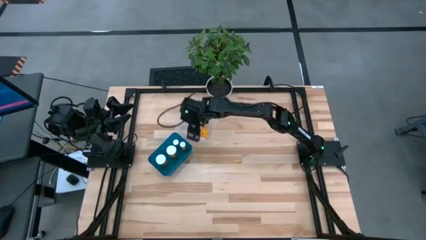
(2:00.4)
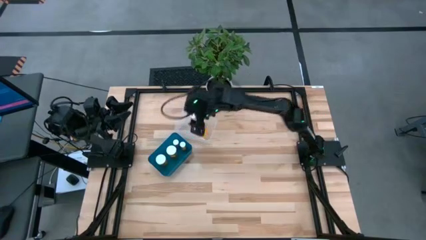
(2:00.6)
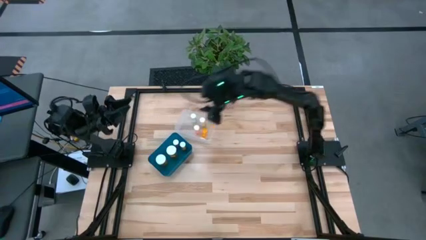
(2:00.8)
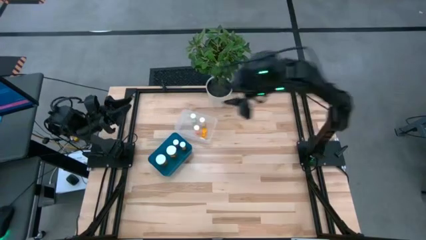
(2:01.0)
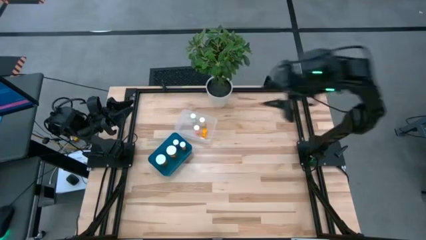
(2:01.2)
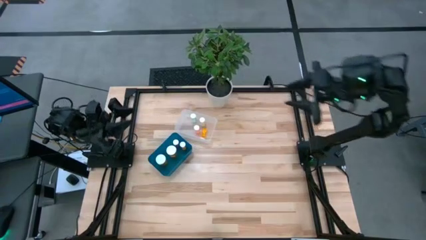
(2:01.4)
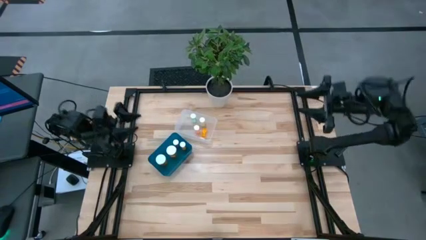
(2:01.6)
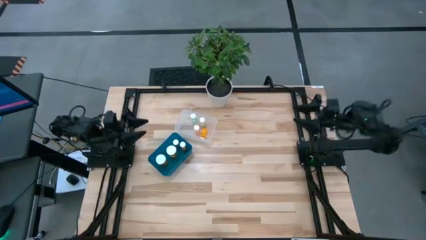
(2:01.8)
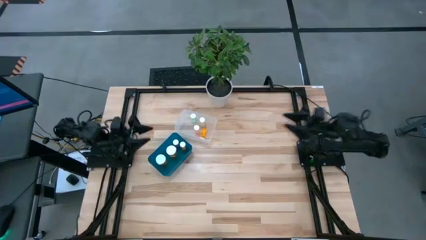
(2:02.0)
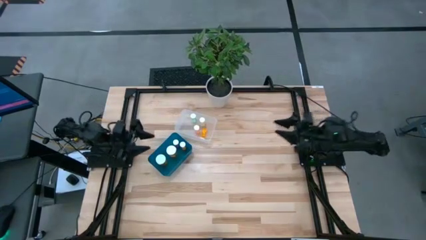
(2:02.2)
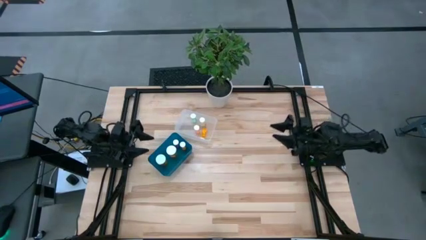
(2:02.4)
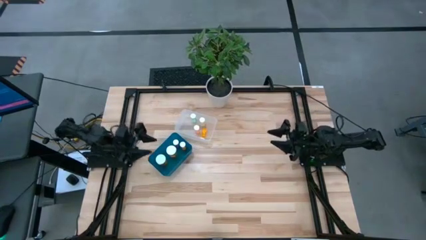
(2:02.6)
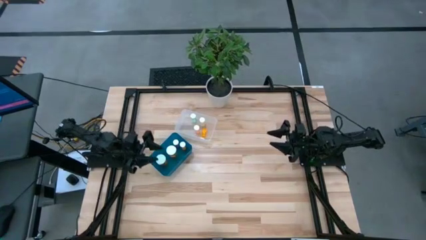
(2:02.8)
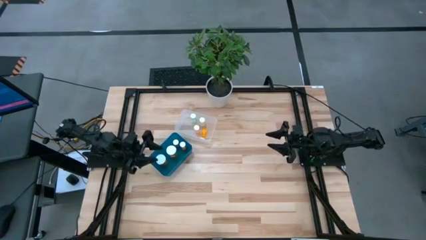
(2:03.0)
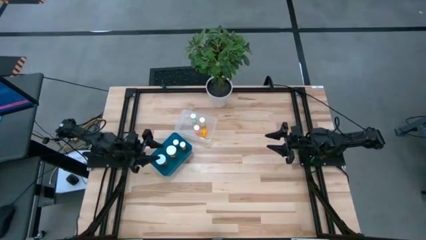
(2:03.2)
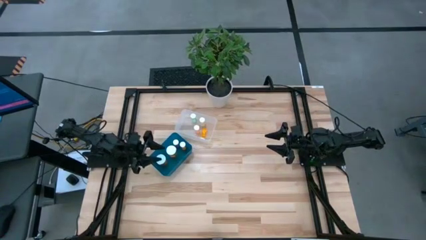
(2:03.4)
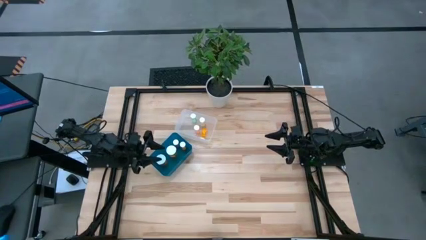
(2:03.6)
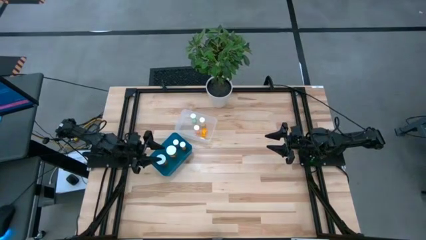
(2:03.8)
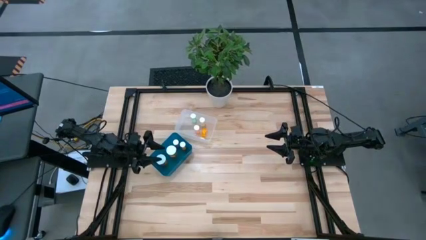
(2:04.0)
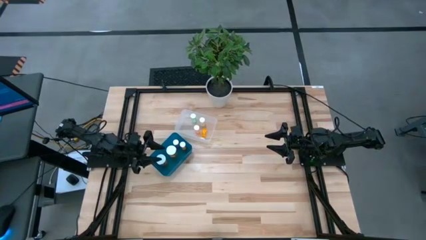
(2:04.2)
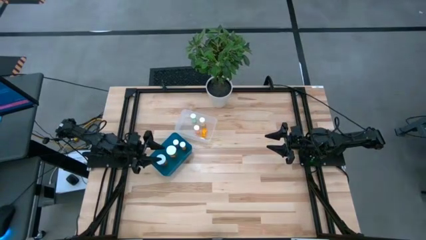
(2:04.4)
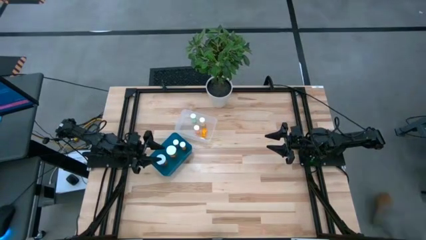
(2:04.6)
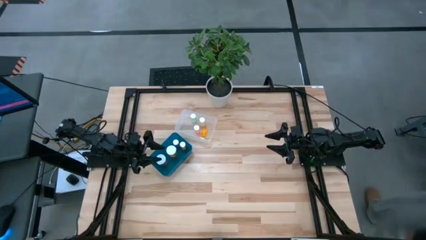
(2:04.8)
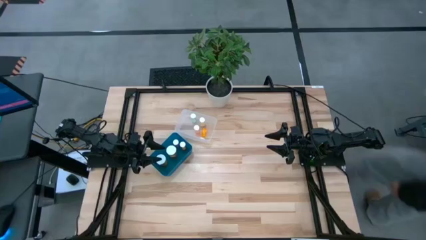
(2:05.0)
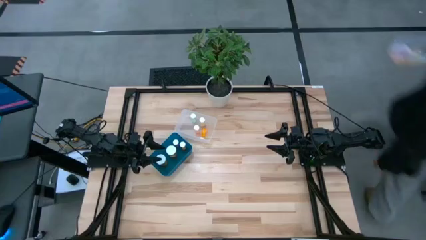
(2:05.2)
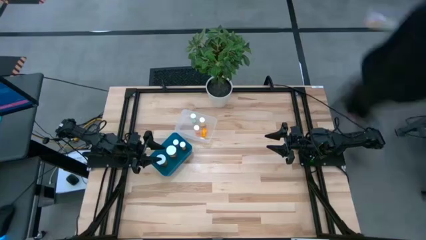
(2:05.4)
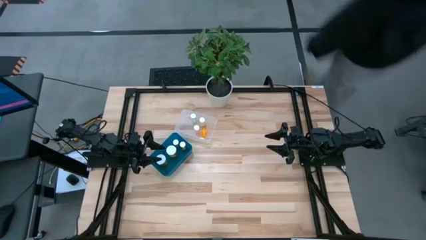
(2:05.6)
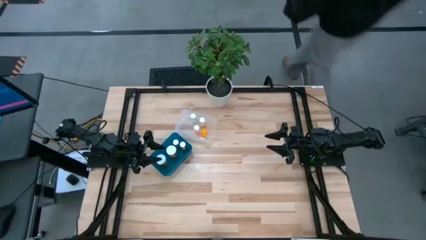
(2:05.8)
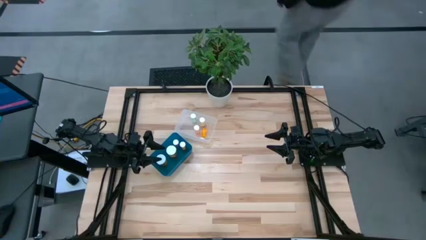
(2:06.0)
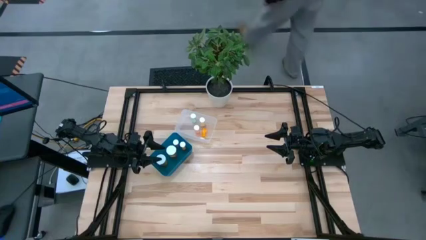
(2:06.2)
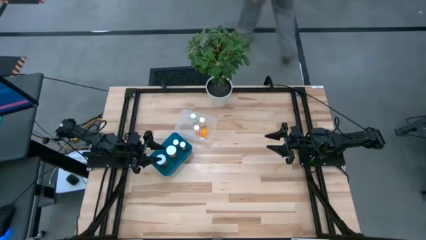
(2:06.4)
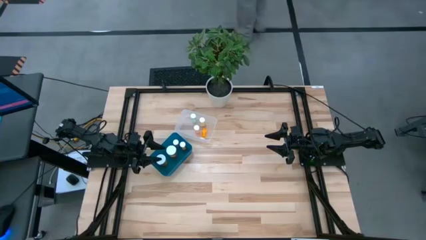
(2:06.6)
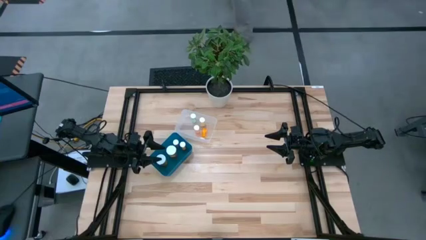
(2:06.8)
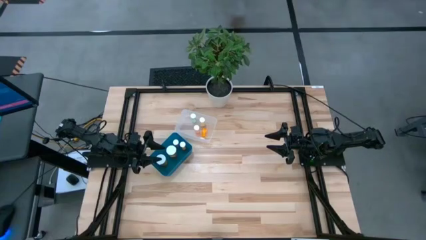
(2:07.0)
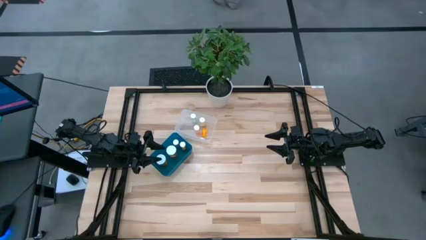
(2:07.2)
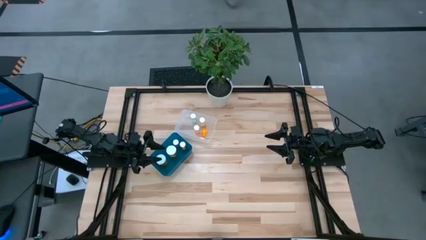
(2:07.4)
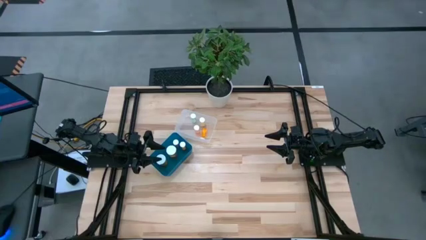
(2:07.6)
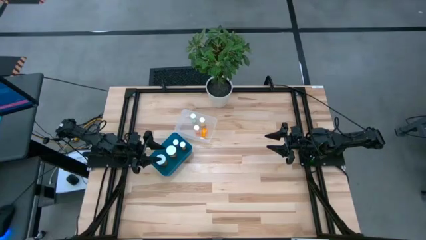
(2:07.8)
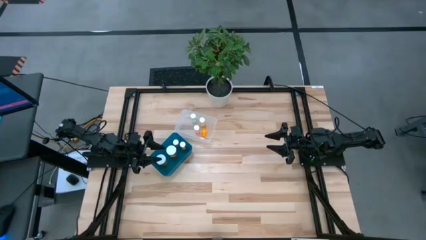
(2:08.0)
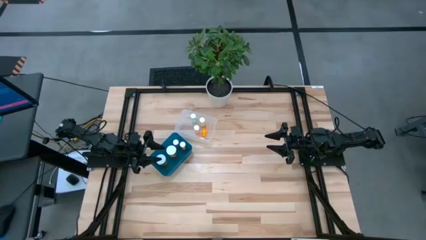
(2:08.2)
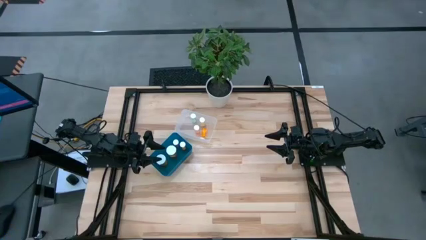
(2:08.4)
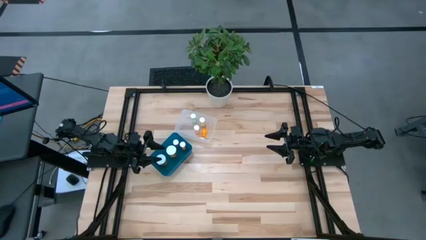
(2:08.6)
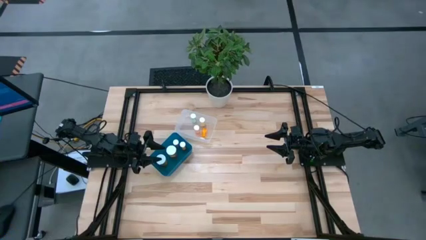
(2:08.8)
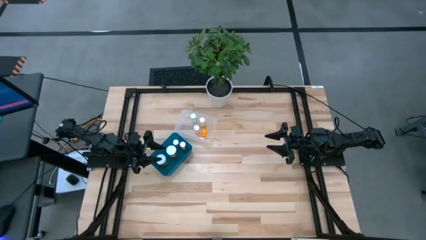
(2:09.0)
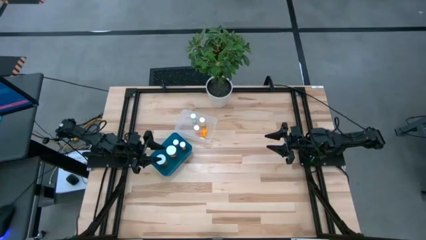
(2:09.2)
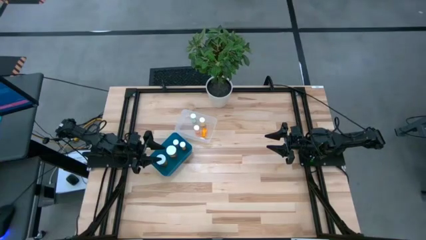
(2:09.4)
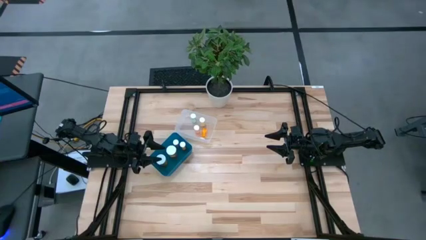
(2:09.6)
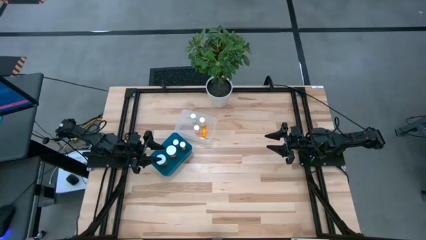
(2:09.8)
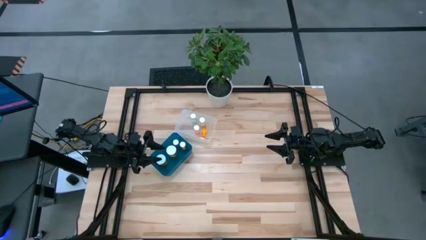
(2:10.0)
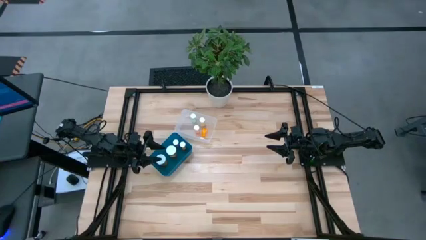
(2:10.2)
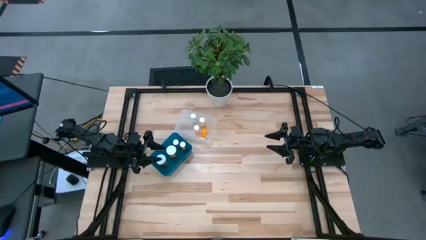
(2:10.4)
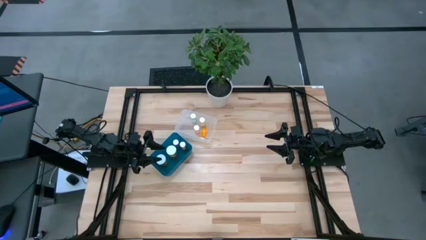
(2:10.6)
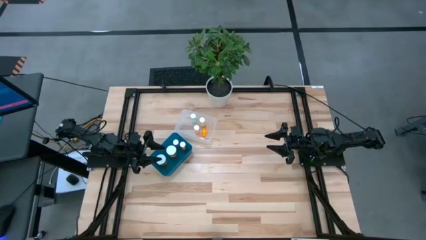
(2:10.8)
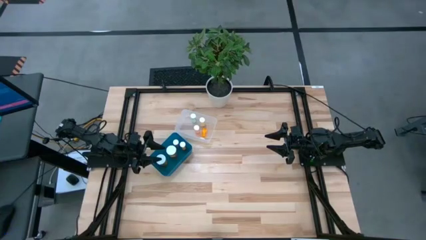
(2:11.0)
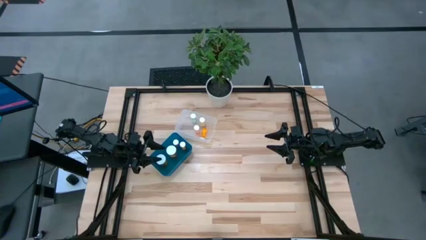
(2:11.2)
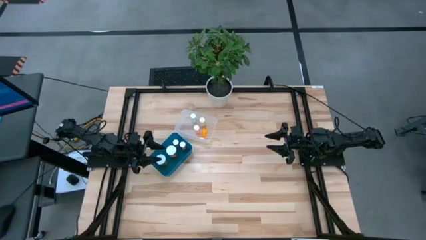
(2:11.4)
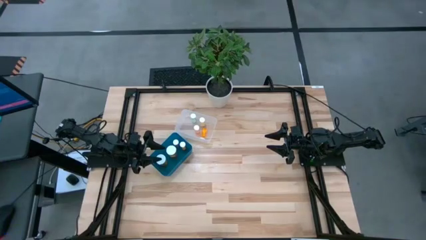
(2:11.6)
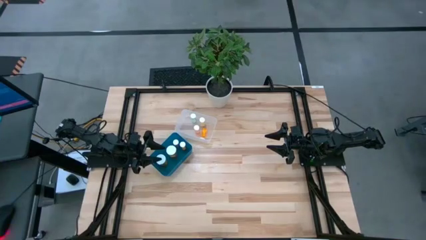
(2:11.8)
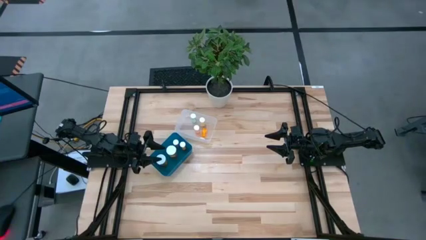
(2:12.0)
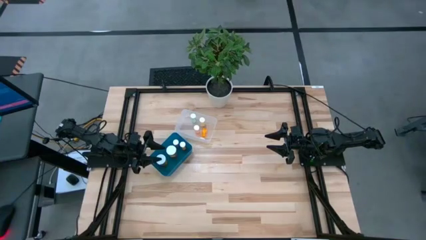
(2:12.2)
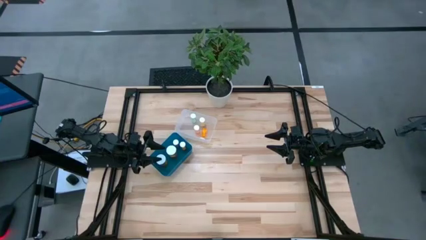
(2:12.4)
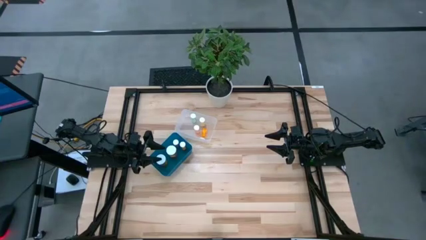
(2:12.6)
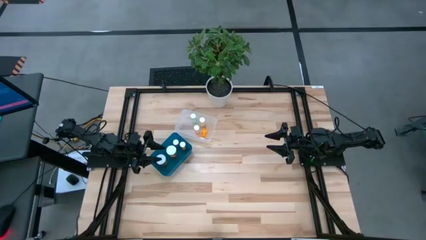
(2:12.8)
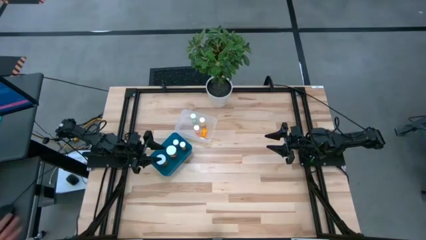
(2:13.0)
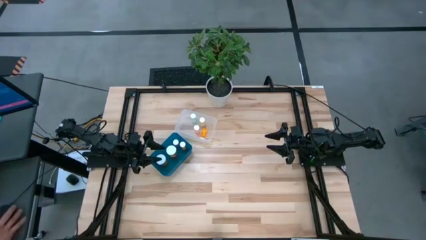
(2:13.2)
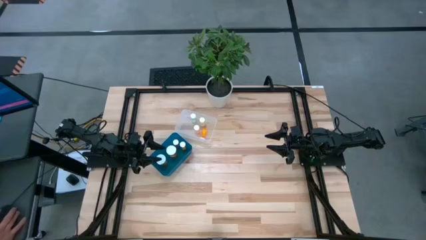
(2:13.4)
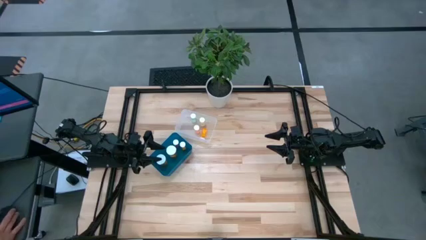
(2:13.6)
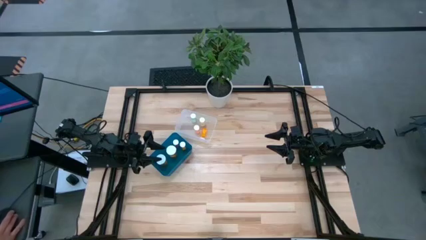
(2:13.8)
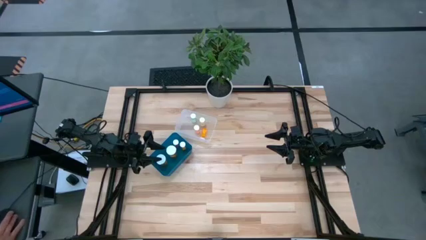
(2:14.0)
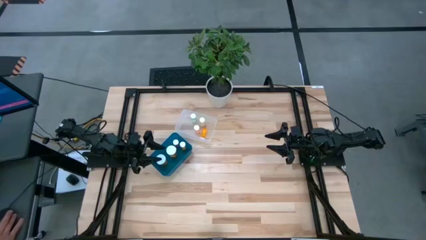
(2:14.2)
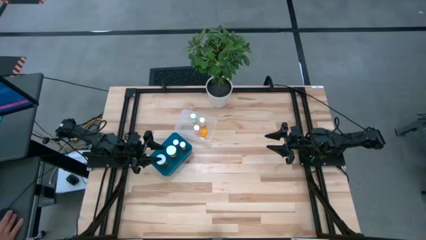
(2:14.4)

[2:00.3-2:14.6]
Task: Pick and place medicine bottles into bin by pill shape (circle, oval)
Return to Home Position

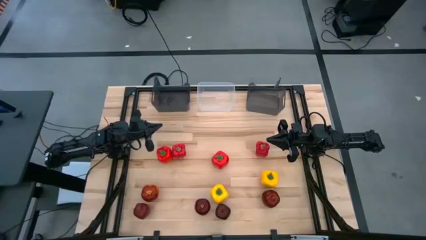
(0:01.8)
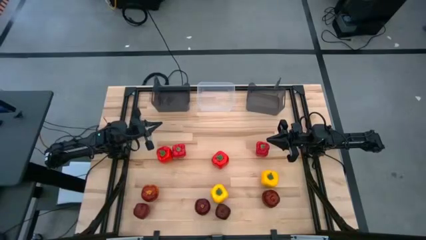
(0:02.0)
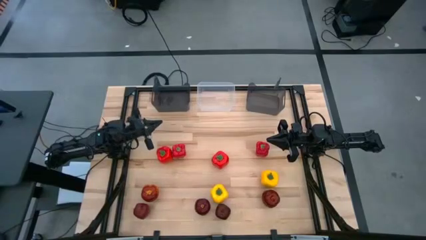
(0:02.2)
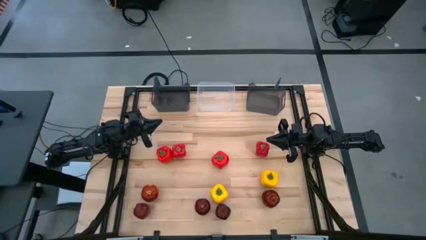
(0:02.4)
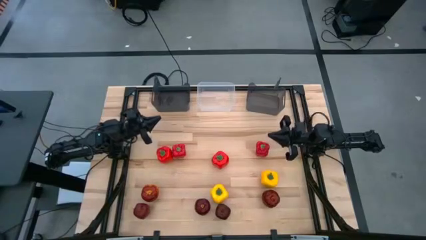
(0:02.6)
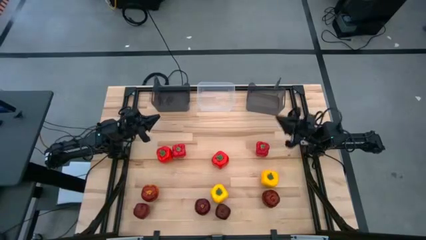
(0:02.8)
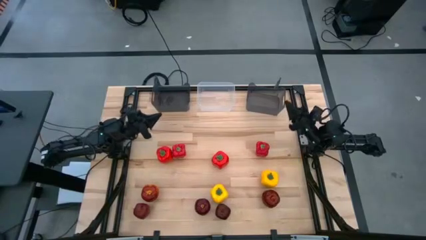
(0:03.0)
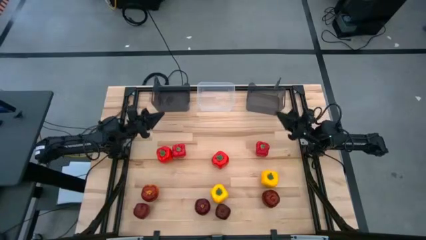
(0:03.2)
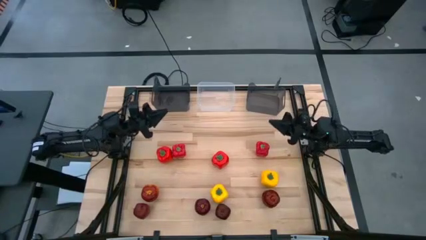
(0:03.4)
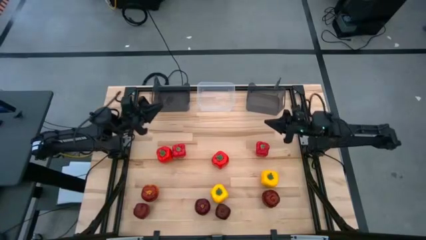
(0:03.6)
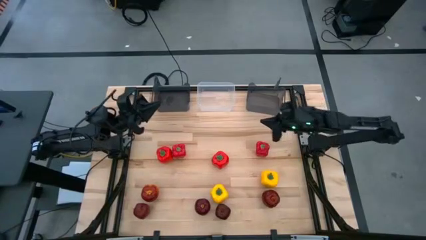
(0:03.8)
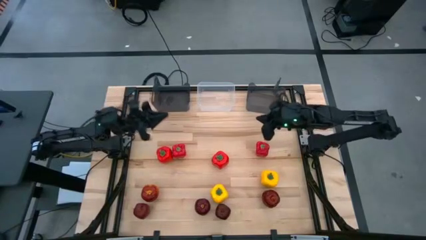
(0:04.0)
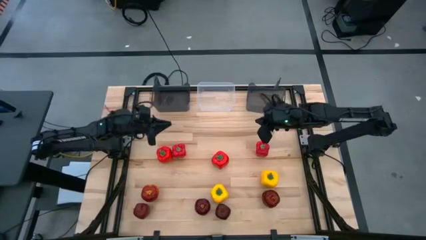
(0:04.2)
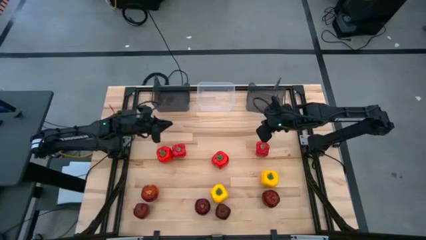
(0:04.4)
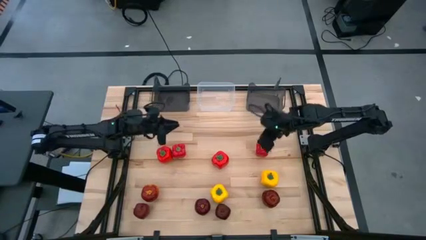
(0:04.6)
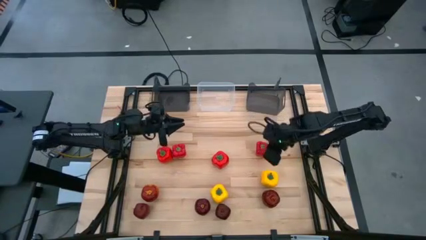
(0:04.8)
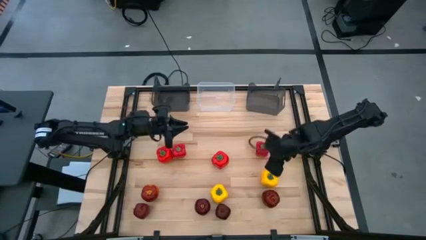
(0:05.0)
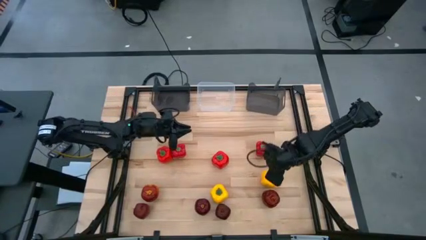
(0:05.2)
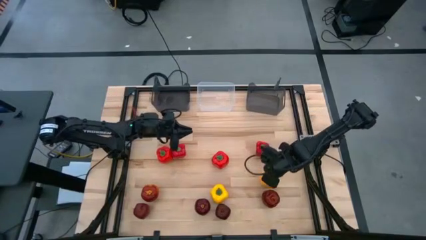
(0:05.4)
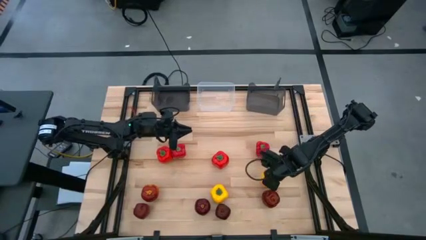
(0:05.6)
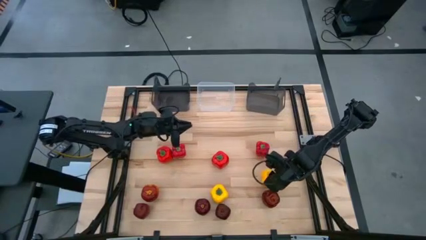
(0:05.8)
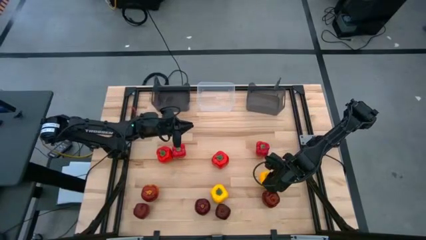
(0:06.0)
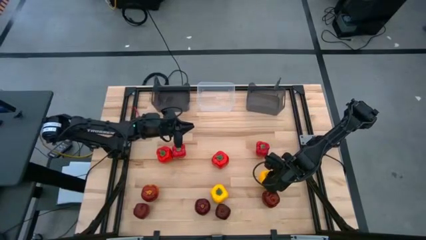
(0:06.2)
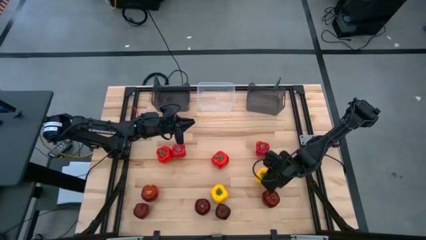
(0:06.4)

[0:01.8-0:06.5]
Task: Sort produce into baskets
Put the right yellow bell pepper into the left black bin
